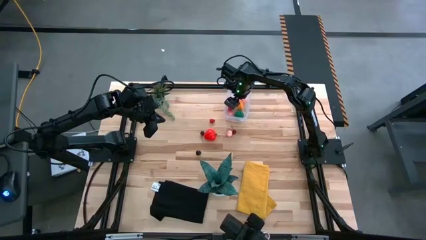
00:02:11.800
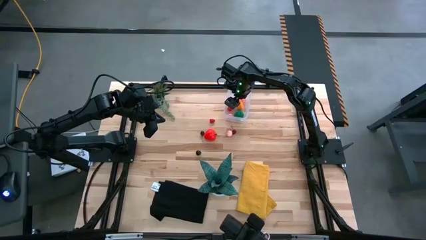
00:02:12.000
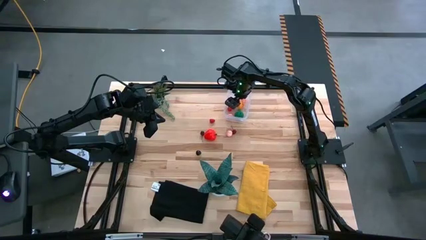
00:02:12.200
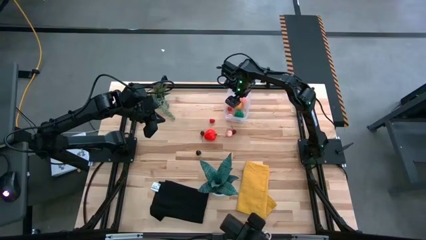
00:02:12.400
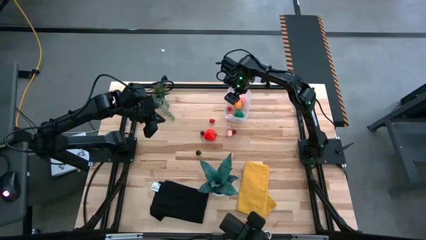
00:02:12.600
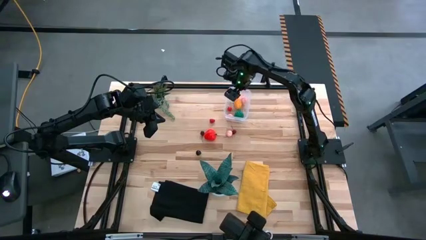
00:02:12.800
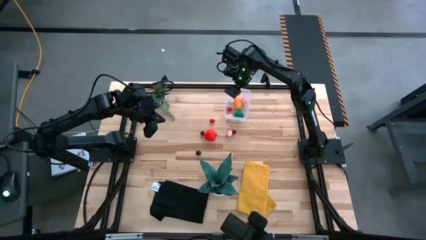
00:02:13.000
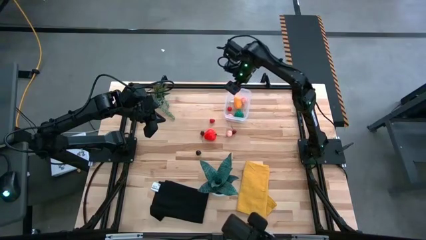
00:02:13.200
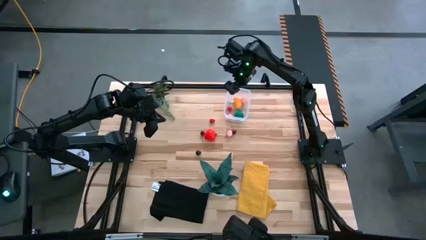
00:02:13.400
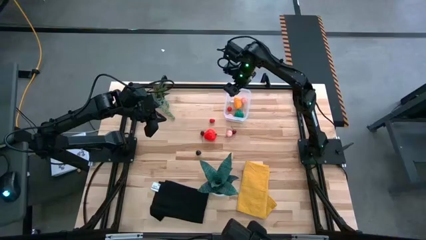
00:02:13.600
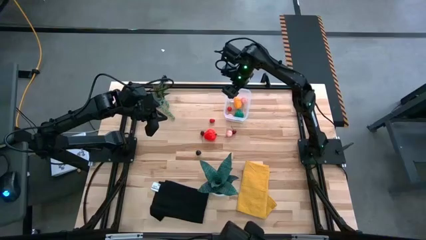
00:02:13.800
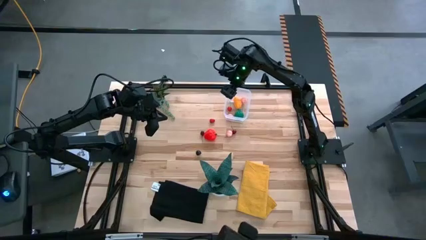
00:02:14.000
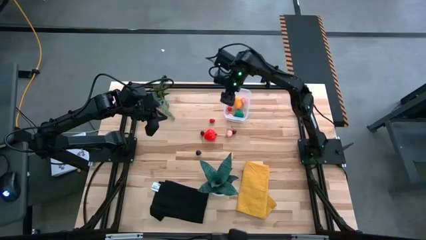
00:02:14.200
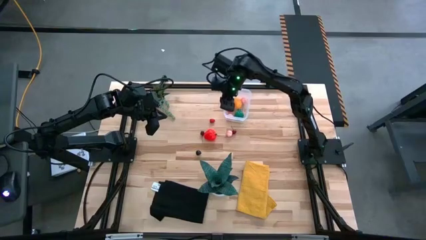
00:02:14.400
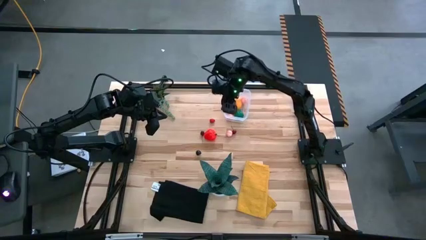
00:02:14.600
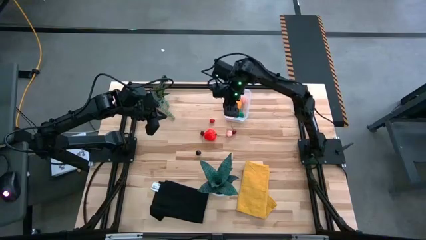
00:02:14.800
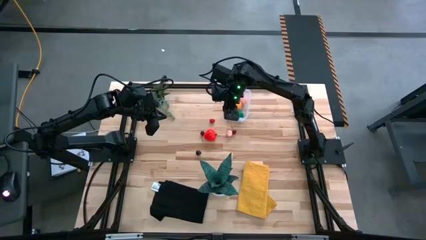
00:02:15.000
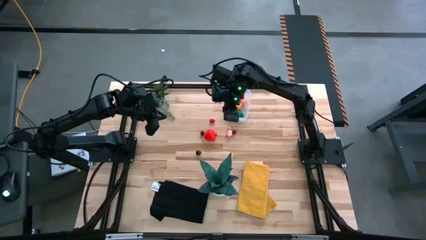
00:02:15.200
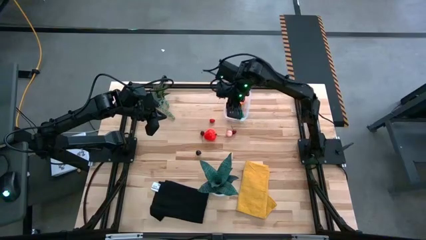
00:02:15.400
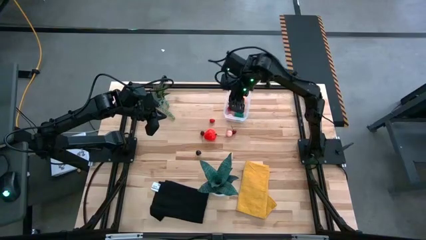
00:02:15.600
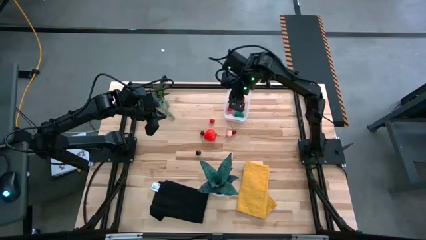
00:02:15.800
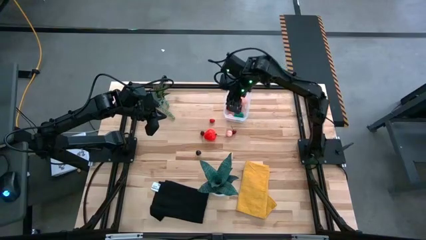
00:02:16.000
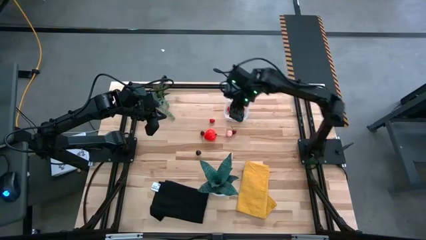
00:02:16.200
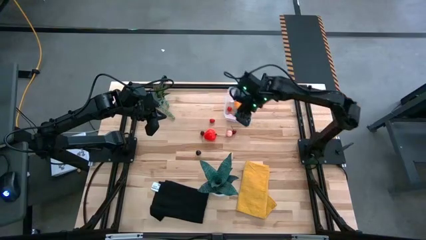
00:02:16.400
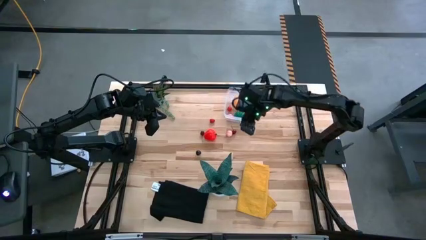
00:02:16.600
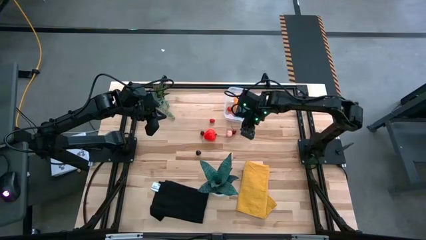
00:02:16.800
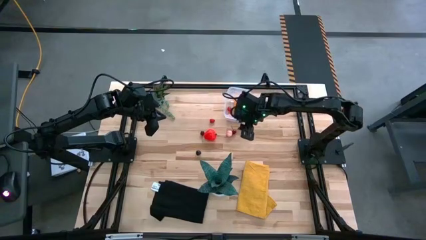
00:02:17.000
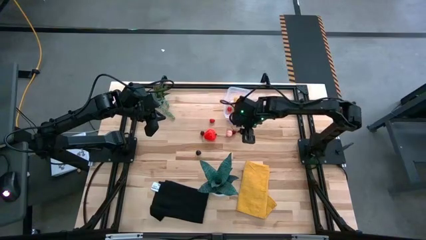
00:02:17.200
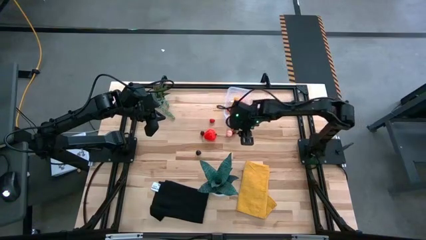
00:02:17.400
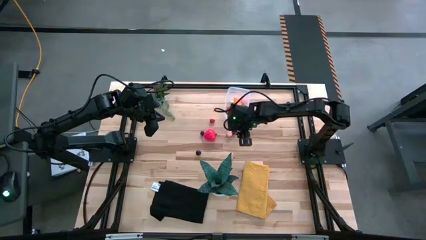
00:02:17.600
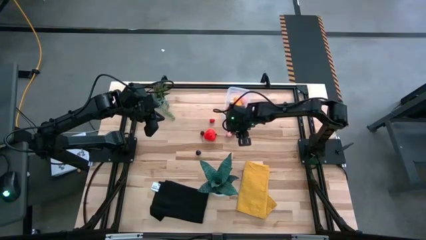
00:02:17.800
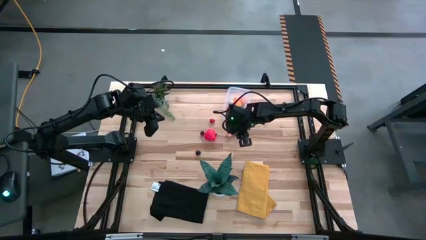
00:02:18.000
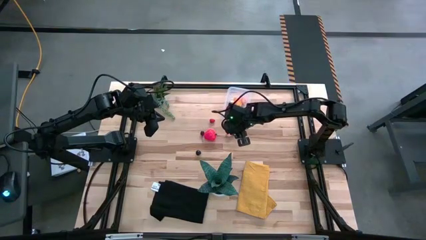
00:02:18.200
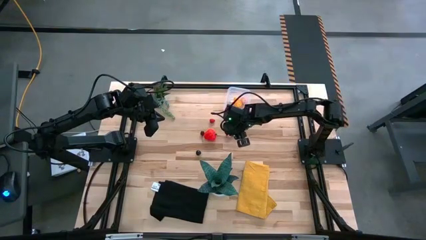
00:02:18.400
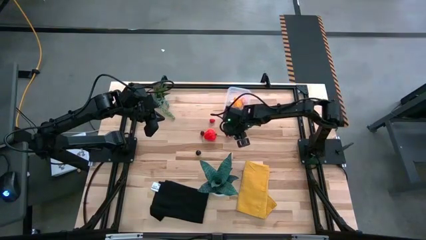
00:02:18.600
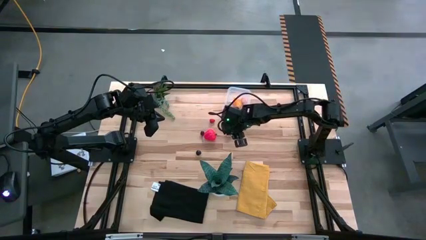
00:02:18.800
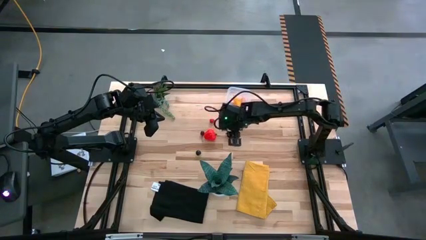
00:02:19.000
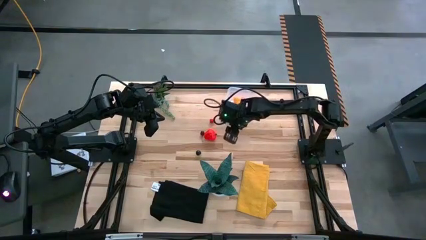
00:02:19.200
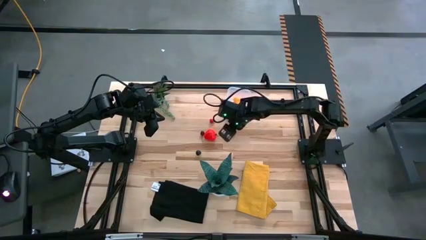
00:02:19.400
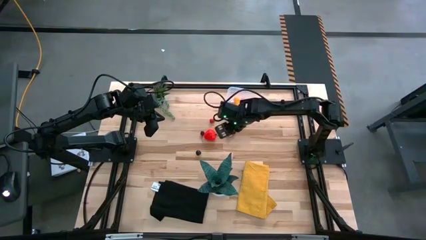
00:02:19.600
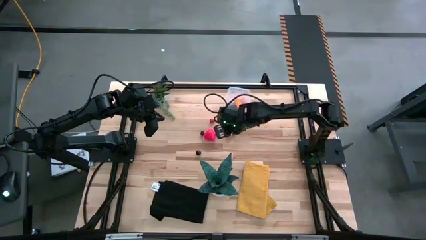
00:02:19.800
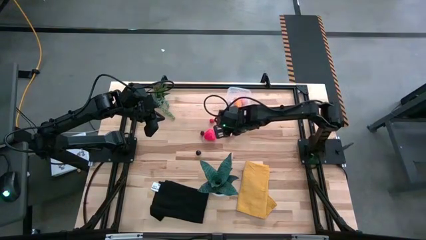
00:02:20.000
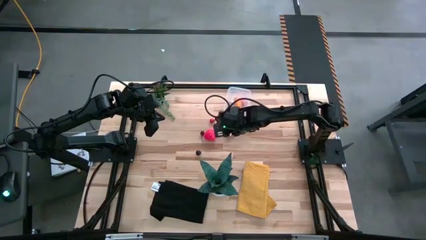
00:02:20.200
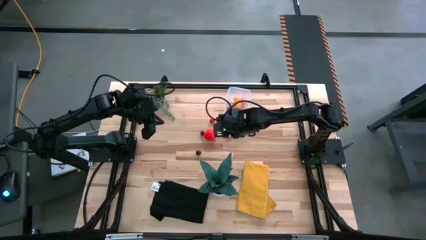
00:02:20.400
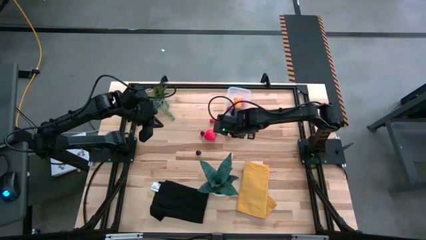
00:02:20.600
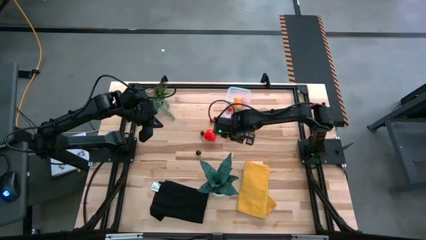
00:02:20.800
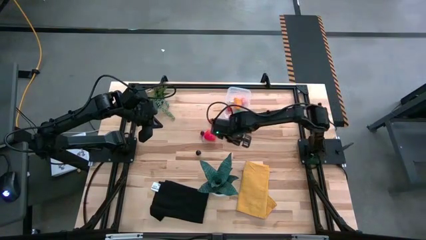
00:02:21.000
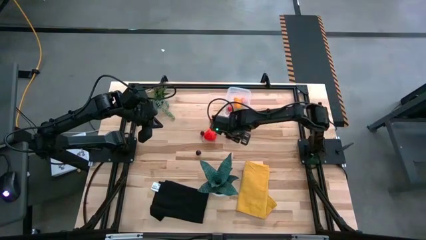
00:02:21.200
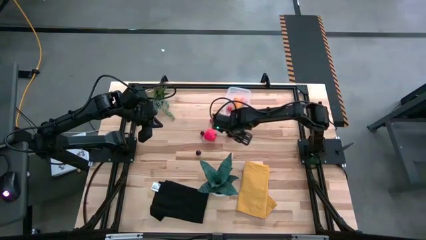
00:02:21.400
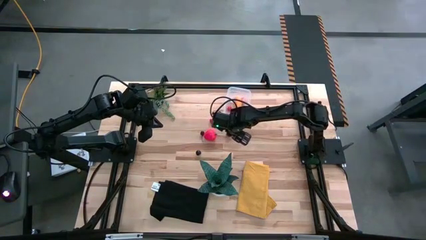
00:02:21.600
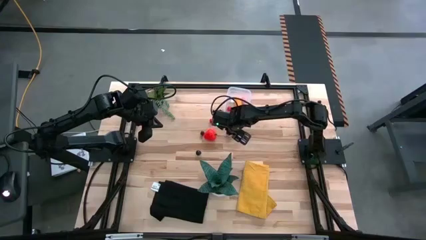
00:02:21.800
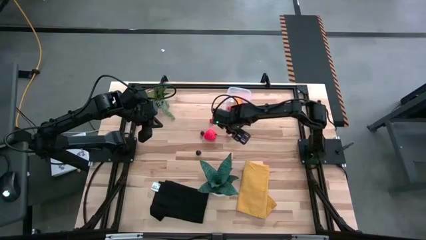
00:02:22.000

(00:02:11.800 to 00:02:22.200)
Task: Pick and placing Produce into tupperware
Put the apricot into the transparent container

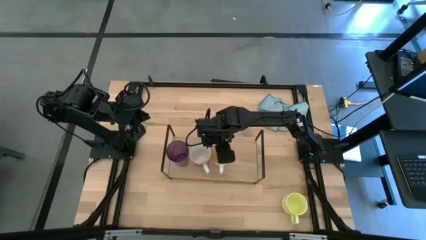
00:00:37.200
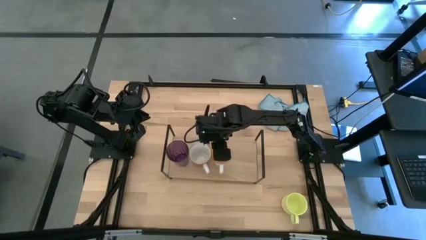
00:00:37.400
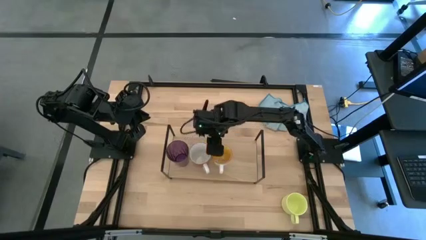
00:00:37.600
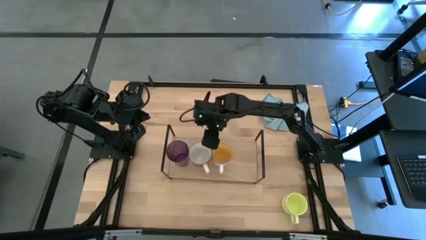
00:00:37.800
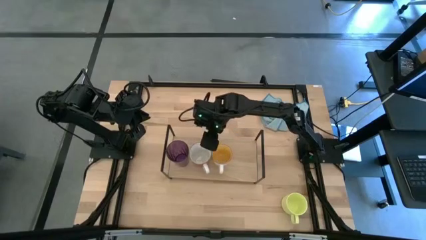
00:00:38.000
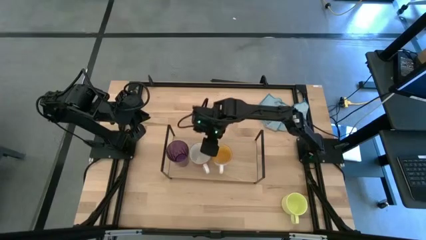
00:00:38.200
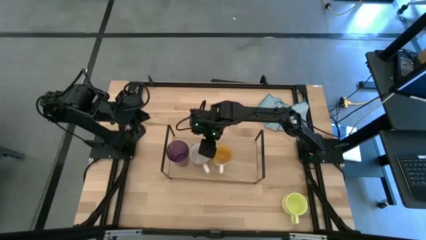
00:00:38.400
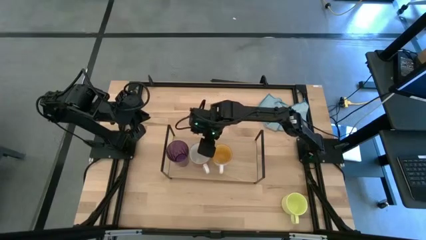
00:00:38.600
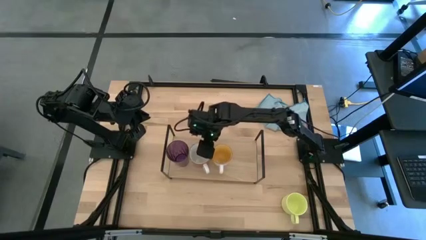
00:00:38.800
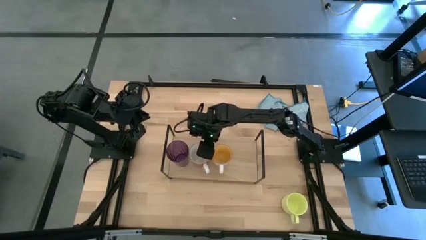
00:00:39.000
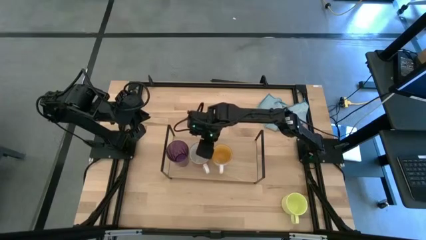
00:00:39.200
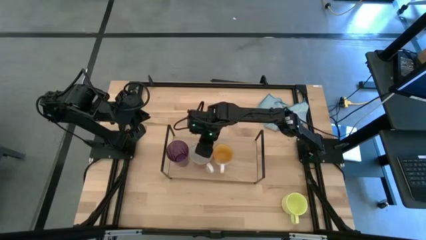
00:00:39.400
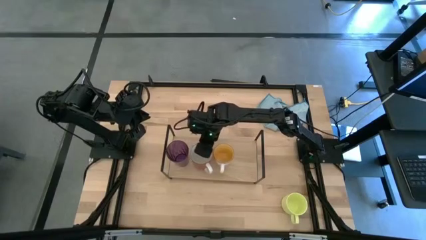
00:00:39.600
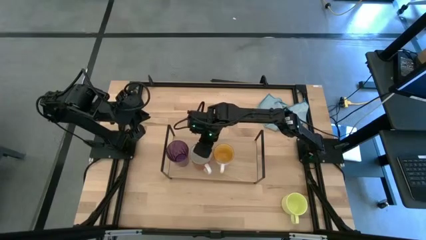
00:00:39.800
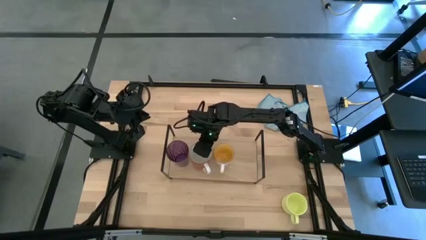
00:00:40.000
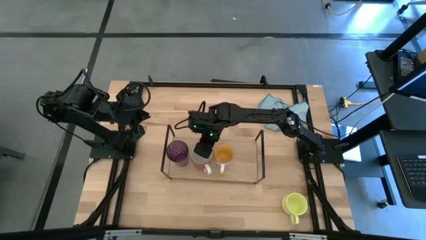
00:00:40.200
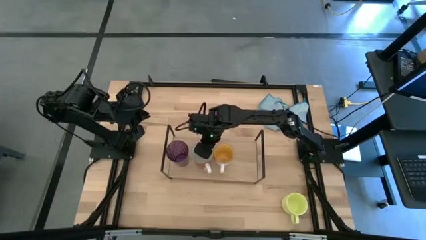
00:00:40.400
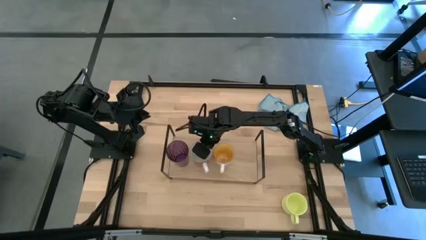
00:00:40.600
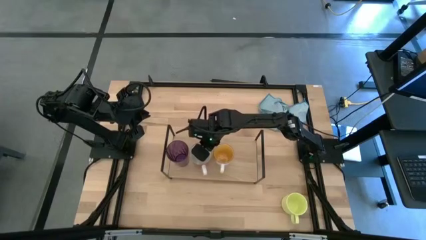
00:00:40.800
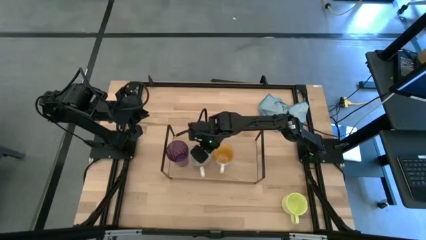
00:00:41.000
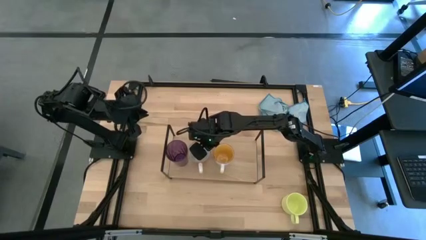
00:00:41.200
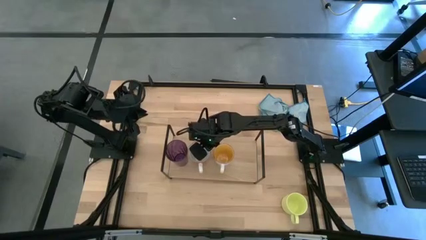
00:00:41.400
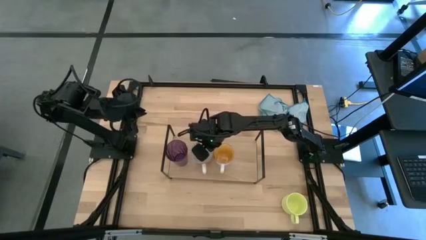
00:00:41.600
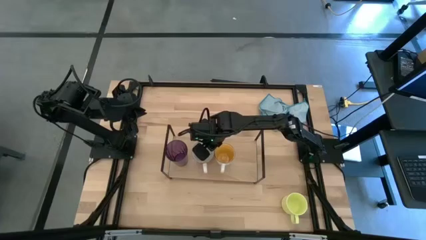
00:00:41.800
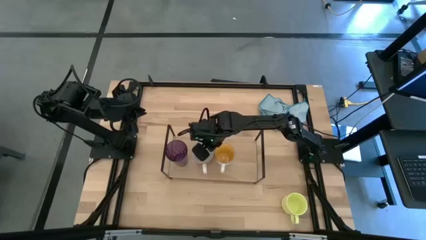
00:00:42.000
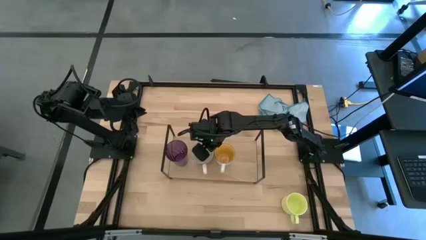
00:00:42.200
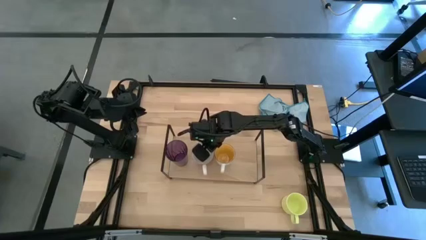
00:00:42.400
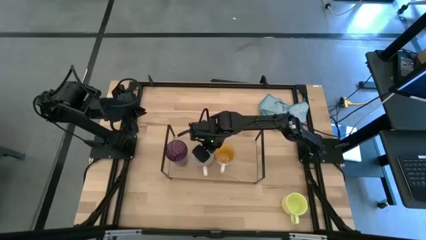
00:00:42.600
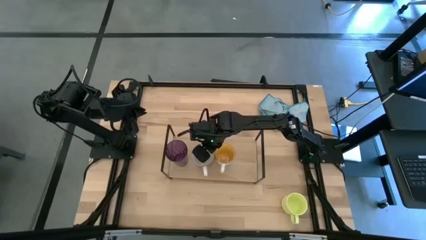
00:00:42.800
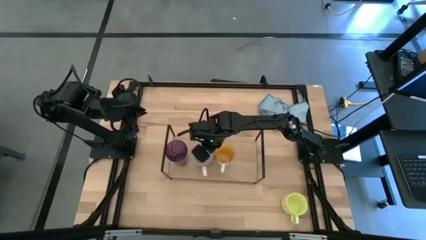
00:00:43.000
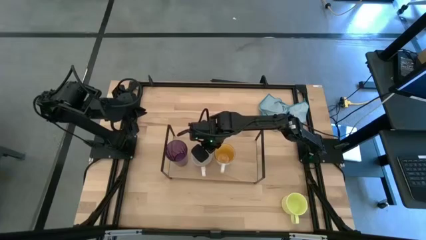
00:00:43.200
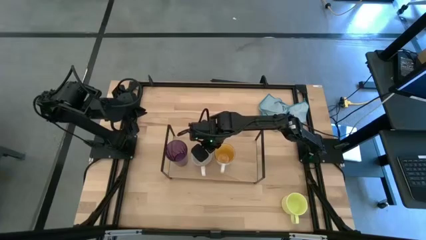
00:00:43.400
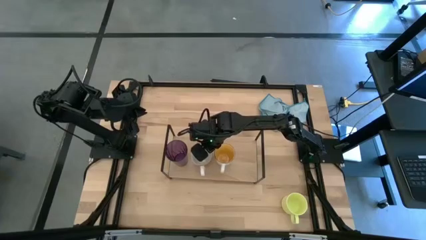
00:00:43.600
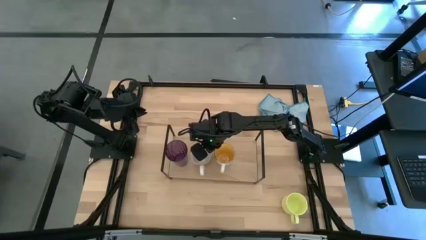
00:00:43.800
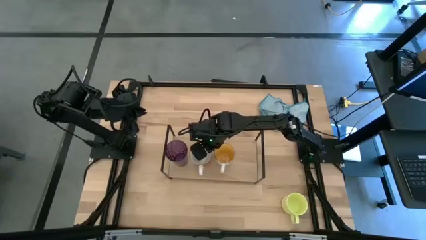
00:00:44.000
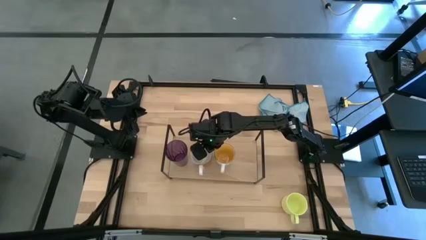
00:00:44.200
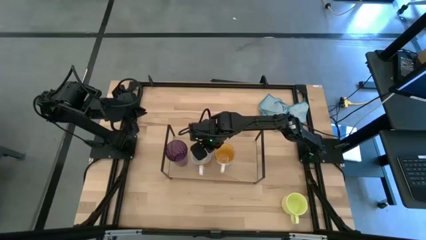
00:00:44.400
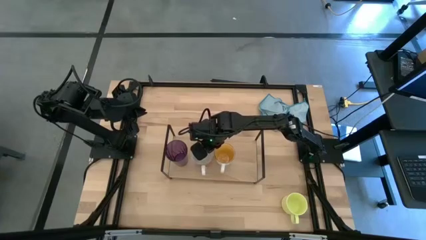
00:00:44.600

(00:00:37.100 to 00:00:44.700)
Task: Stack small to large cups/mugs on shelf
Adjust the red mug on the shelf
